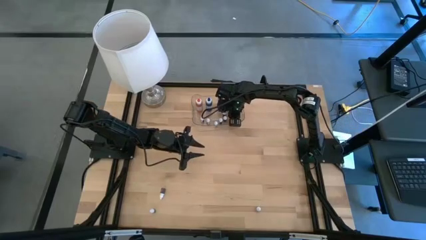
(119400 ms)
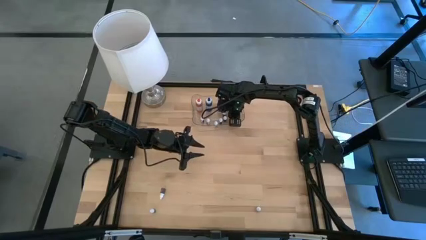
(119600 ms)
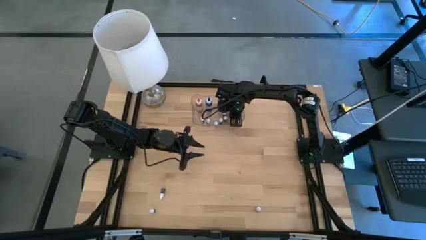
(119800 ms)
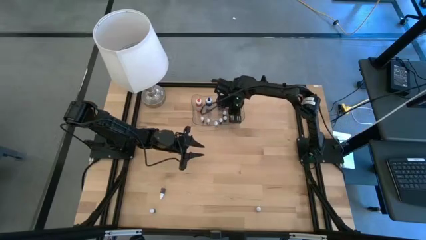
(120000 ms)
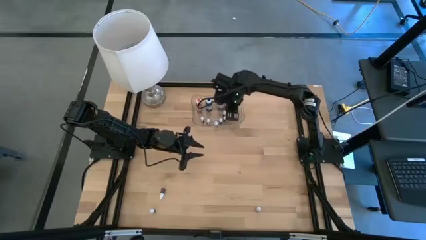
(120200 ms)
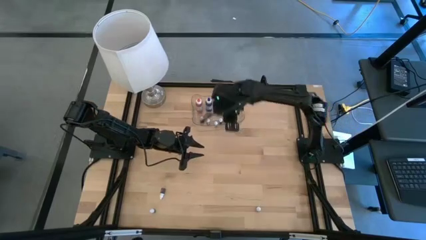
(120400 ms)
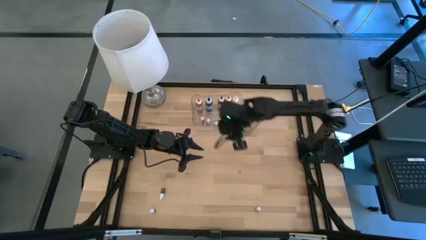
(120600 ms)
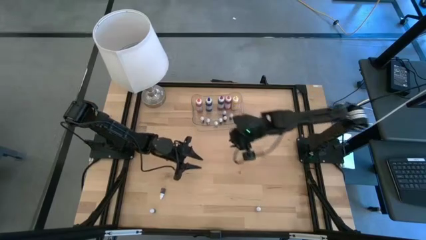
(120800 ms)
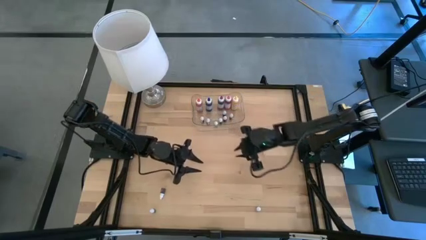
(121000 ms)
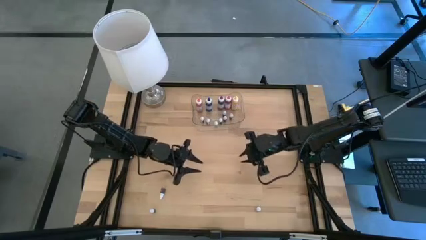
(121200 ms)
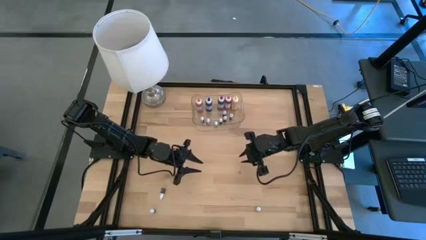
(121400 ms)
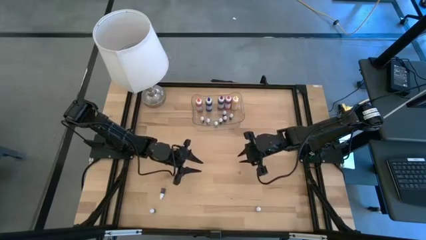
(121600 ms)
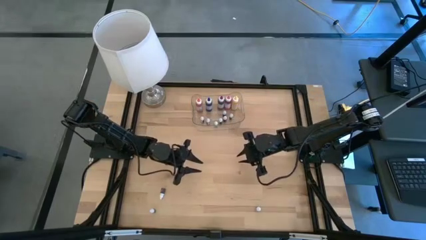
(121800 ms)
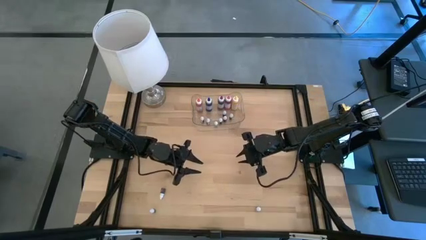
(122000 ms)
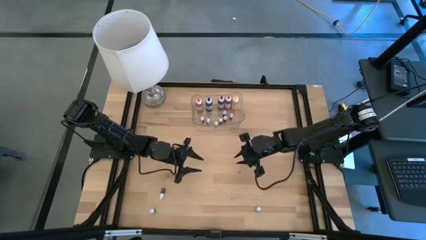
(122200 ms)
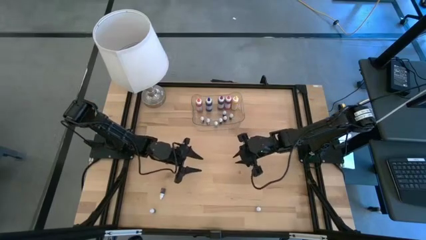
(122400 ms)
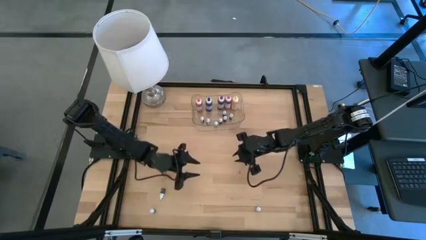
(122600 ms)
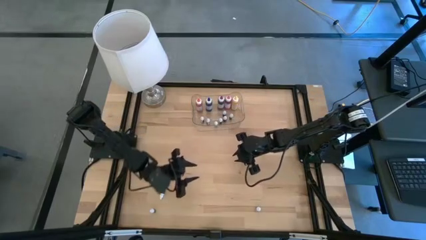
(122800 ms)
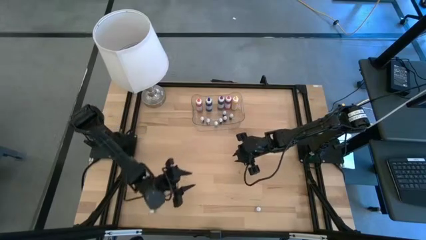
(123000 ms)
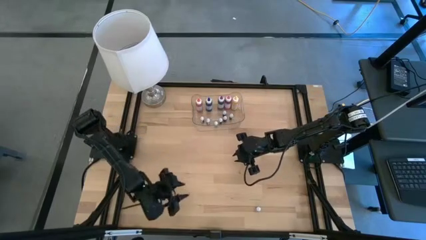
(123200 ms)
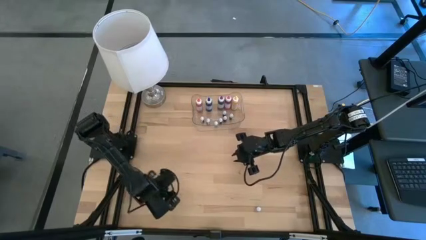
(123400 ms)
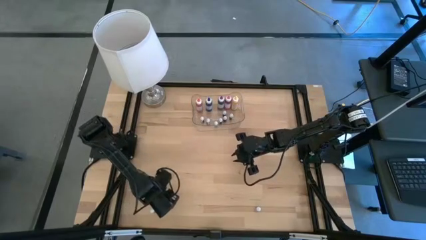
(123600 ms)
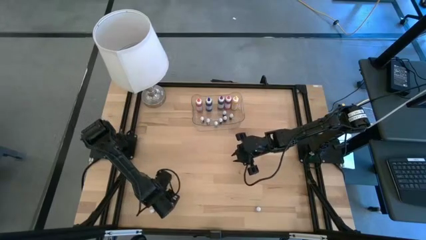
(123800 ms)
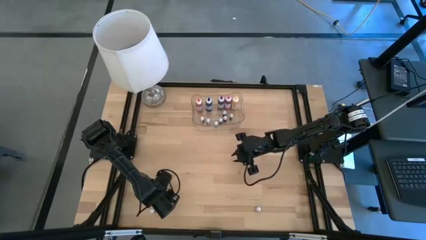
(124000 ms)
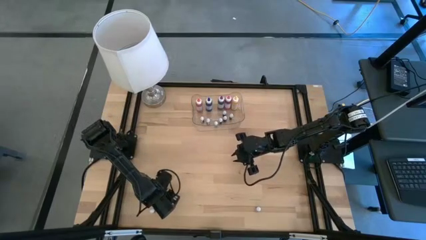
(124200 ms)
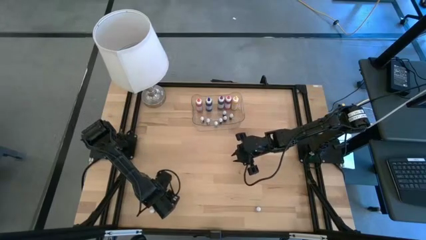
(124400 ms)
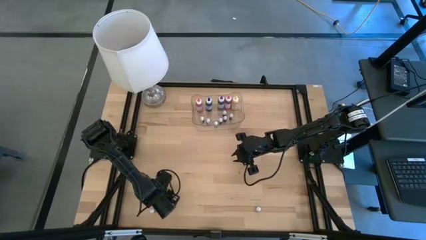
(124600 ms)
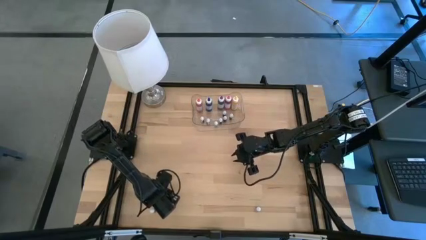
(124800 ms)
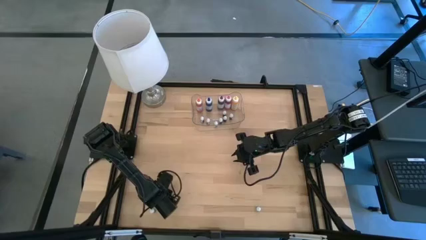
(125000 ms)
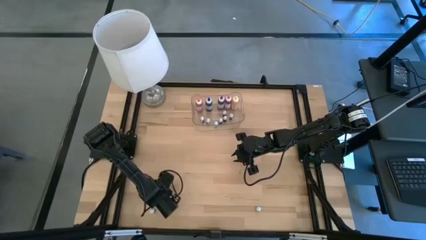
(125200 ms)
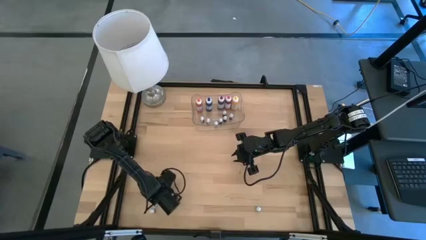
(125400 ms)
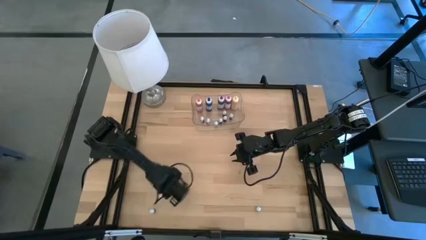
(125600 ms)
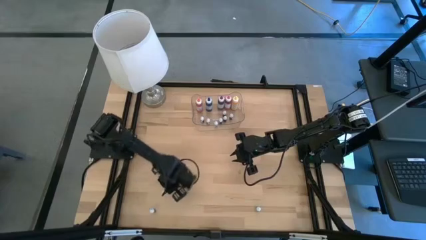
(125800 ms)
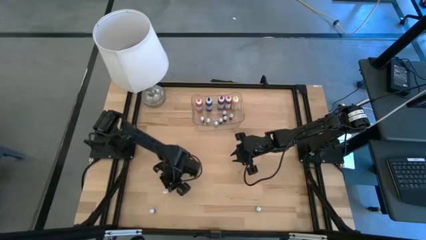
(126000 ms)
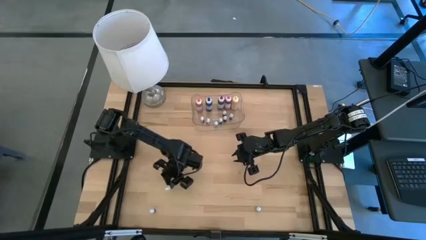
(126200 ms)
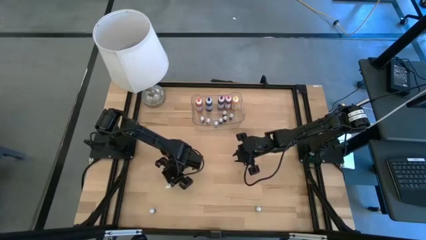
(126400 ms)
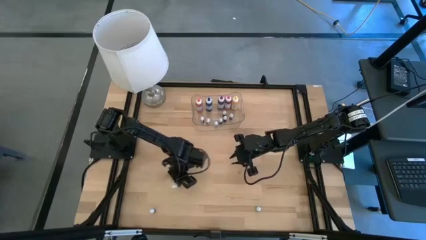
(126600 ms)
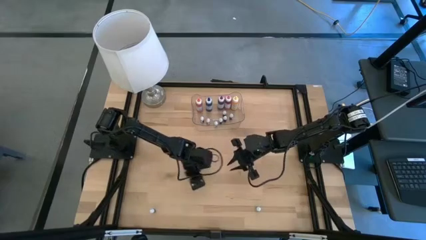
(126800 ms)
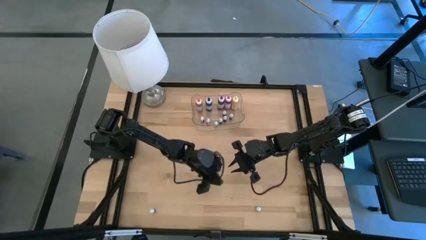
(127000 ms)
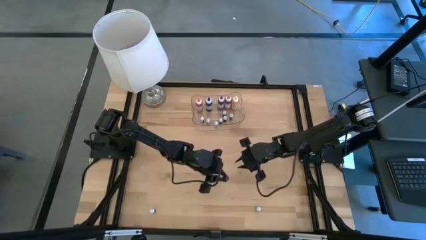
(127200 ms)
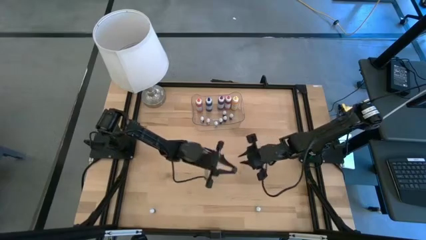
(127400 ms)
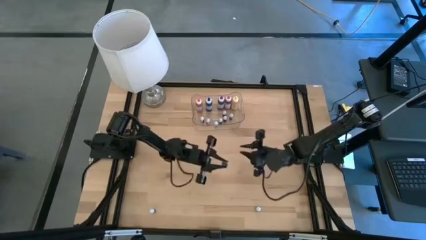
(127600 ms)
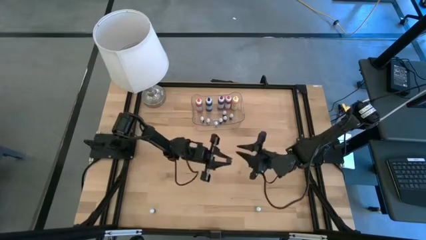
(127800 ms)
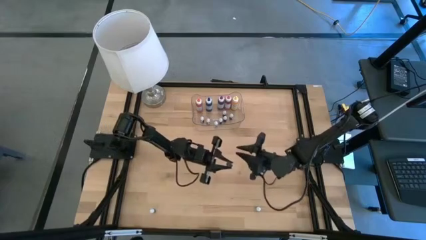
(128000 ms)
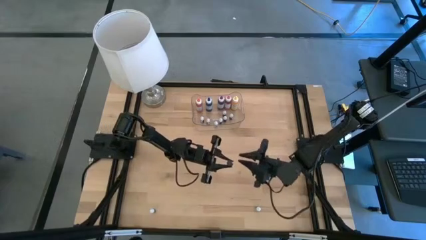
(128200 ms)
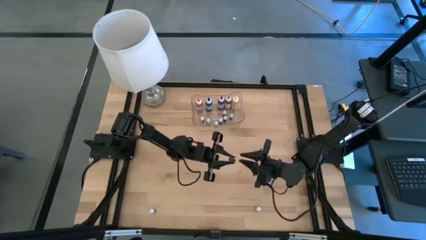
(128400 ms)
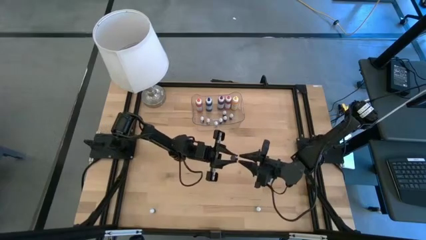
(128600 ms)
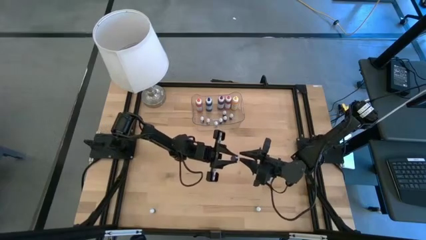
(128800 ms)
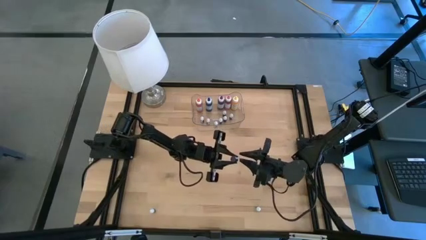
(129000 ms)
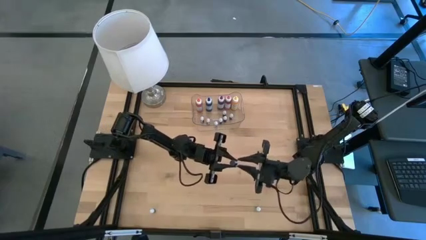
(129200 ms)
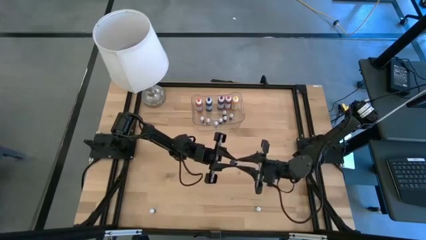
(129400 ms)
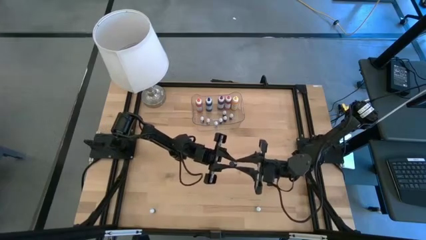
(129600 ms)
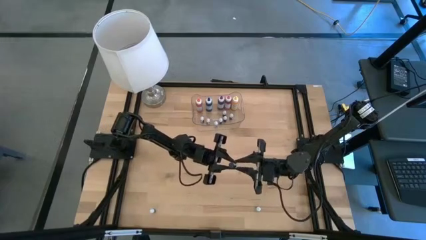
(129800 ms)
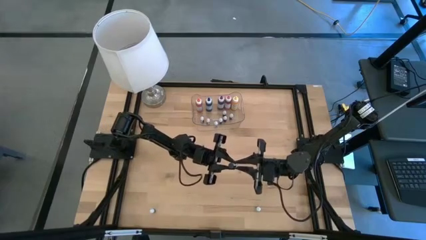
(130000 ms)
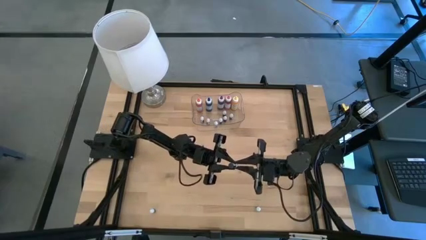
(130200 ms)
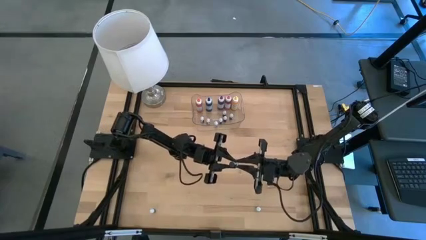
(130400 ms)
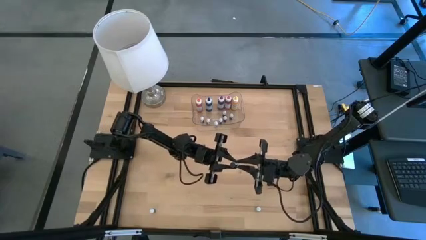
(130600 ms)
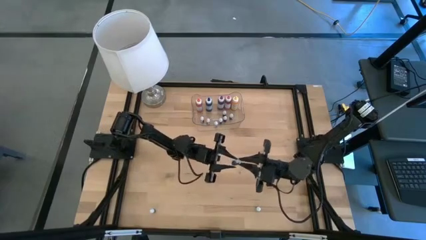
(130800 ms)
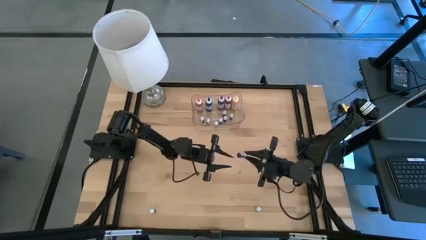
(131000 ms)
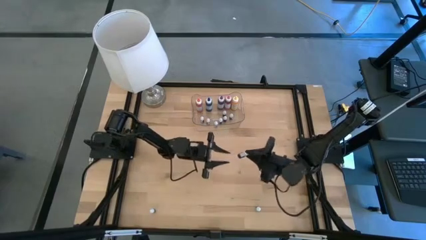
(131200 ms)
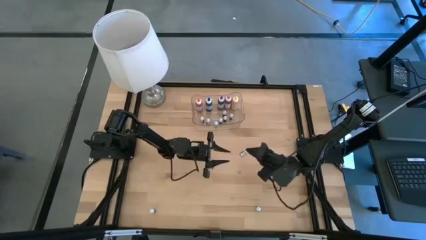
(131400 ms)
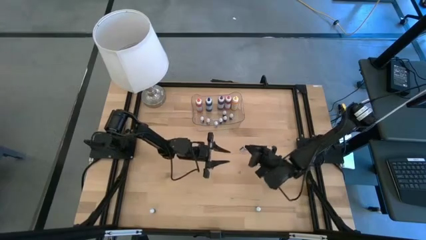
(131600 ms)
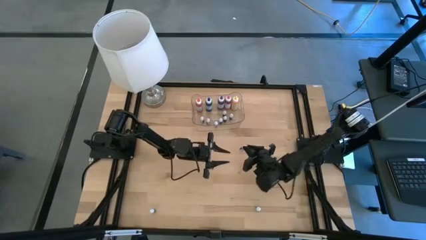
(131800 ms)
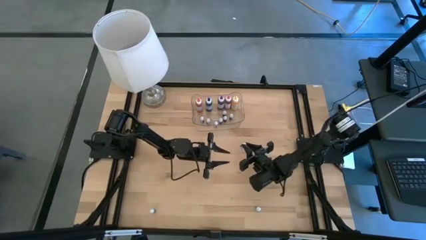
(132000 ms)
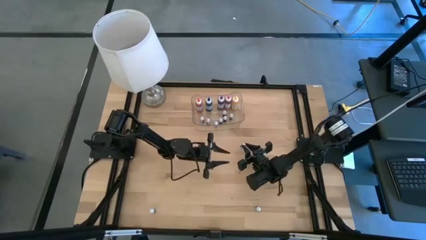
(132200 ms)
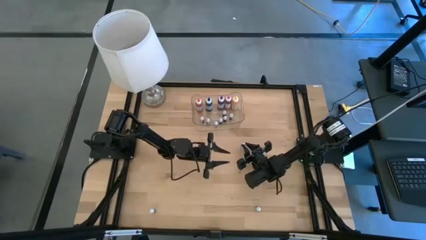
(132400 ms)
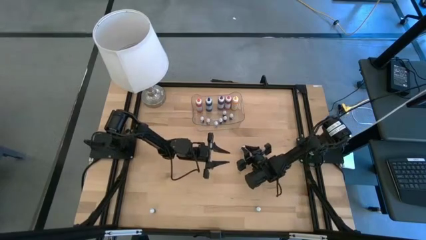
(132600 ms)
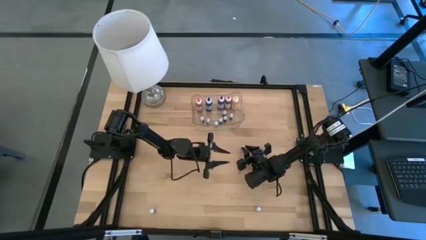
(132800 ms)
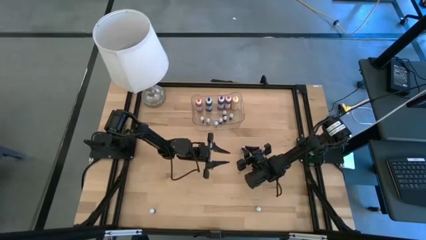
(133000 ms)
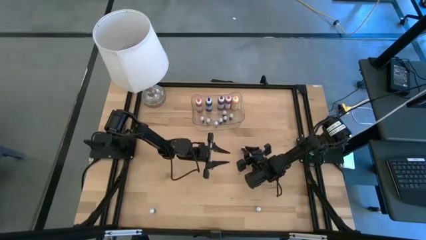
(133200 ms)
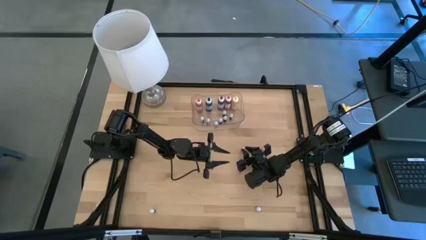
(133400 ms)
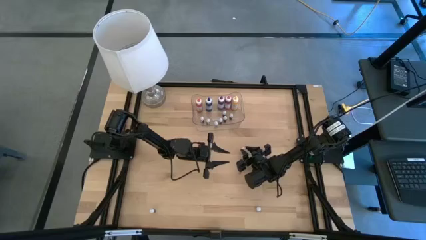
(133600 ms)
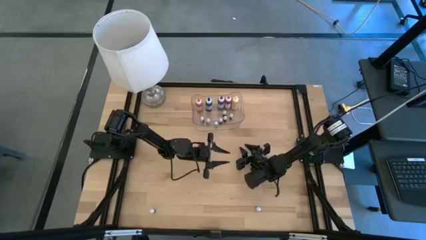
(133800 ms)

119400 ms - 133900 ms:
Task: Pick & Place food coloring
Put the top small purple food coloring bottle into the transparent bin

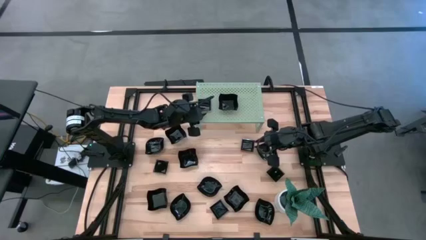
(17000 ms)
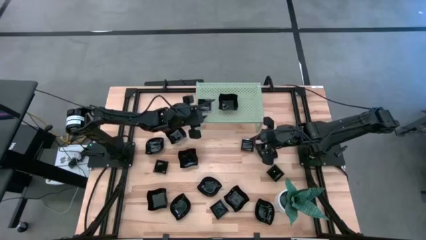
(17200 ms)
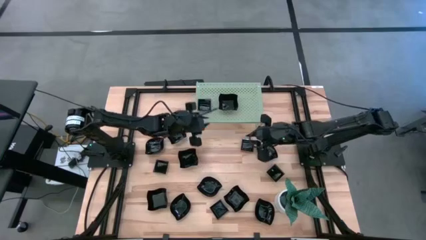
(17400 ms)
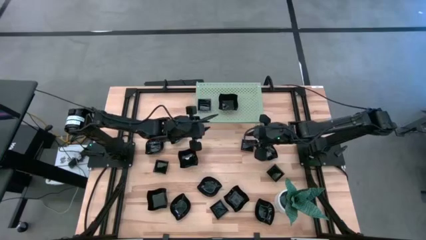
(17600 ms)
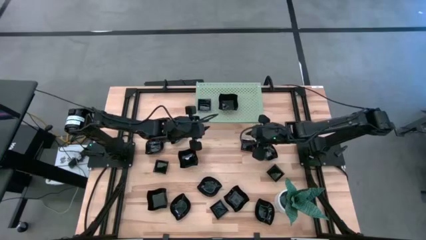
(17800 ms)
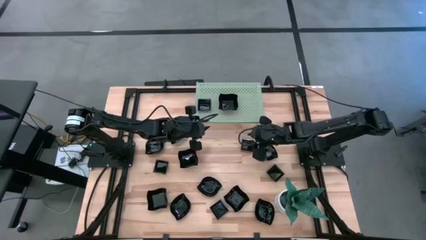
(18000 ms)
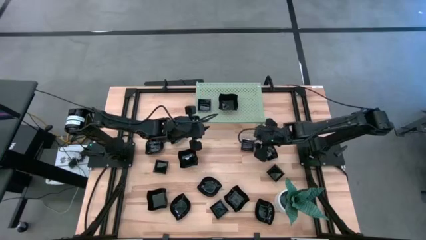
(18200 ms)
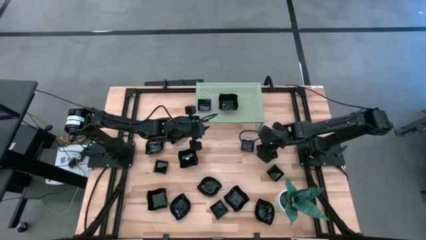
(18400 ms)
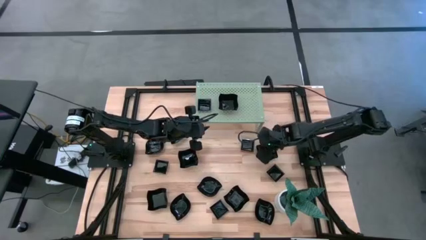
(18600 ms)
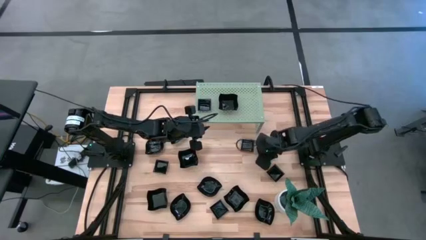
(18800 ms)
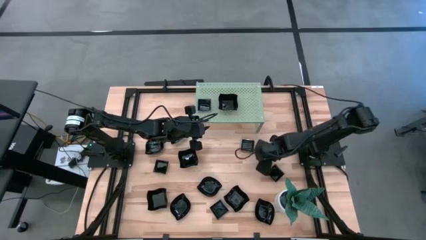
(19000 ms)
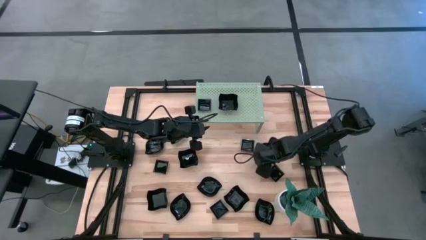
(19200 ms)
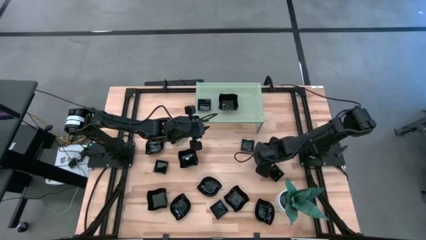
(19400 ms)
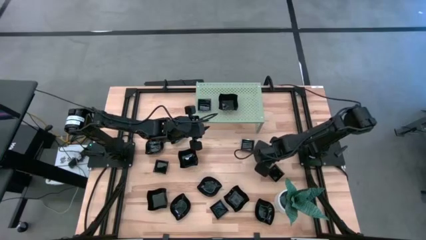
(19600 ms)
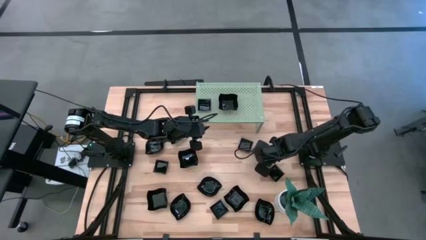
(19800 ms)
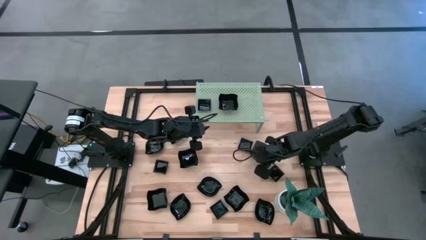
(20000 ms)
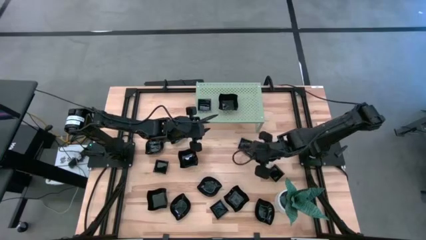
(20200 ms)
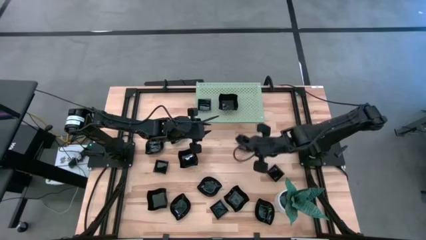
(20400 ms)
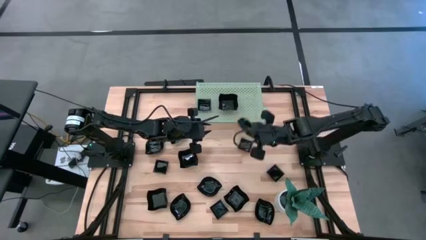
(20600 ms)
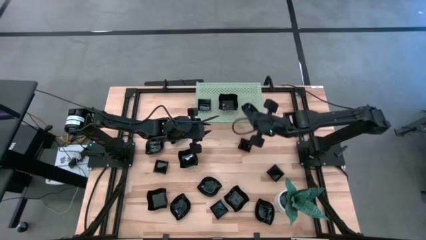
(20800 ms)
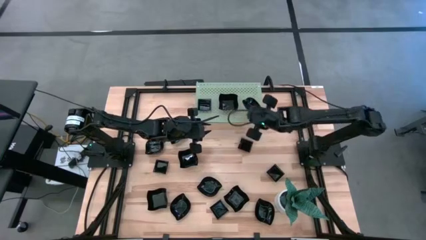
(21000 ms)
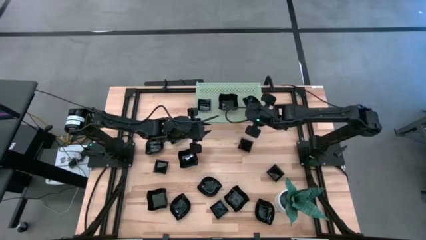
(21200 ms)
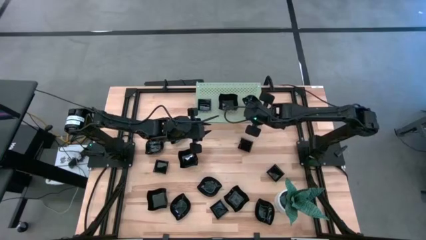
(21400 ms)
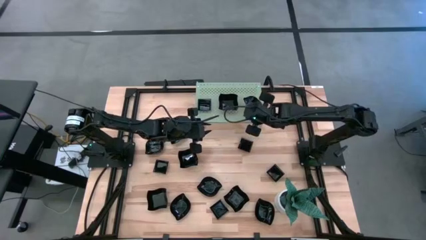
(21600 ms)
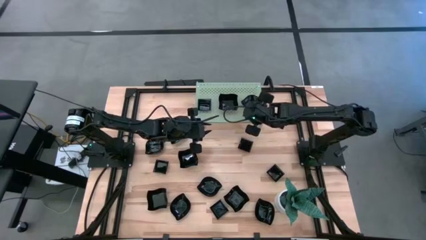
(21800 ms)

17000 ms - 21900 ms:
Task: Pick & Place Mini shaped plates
Put the leaf shaped plate on the shelf
